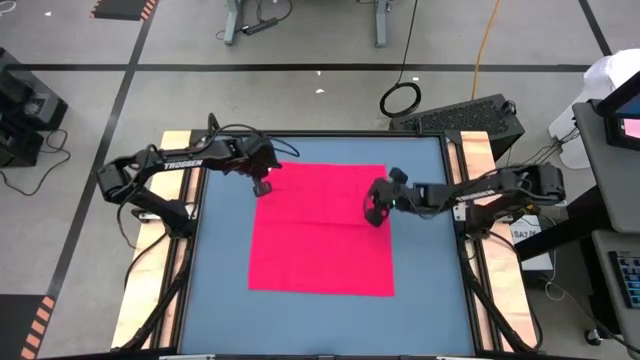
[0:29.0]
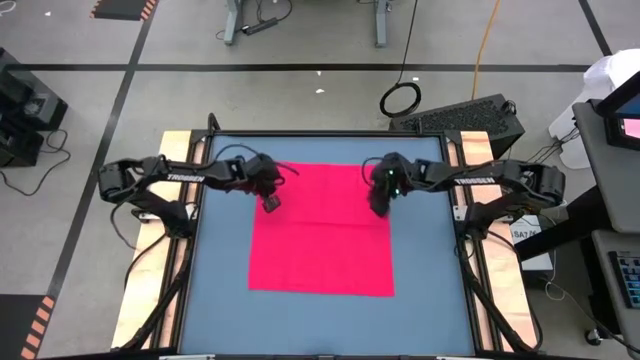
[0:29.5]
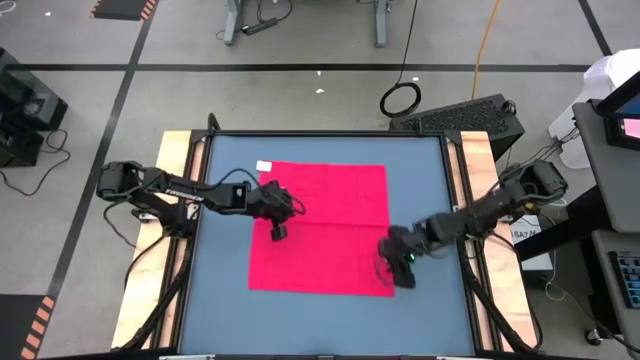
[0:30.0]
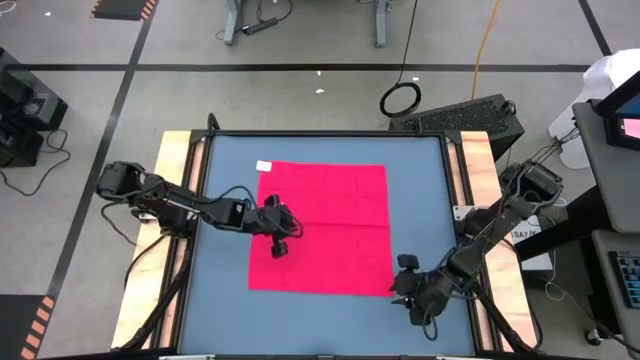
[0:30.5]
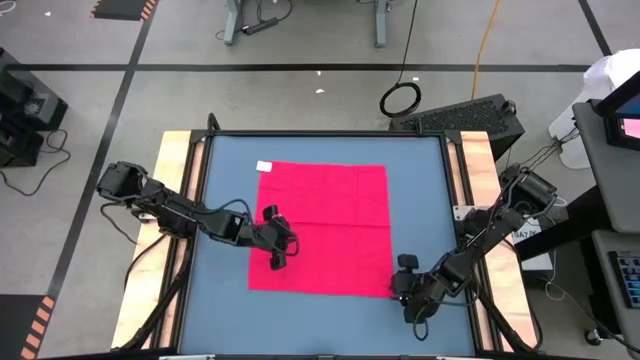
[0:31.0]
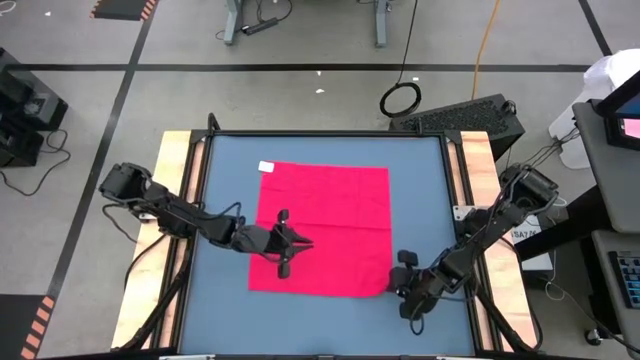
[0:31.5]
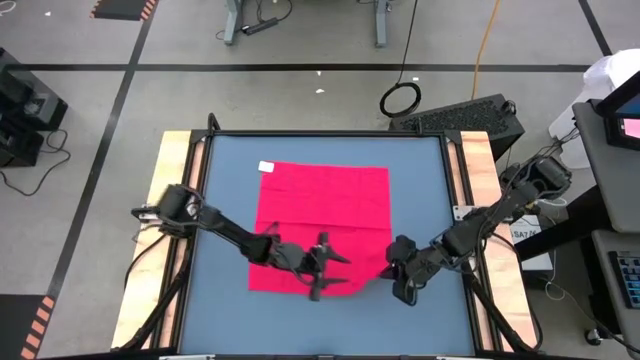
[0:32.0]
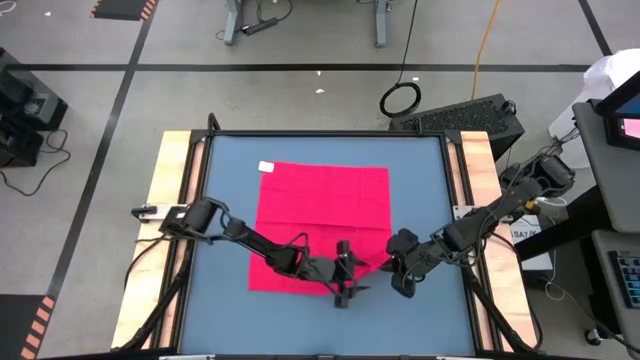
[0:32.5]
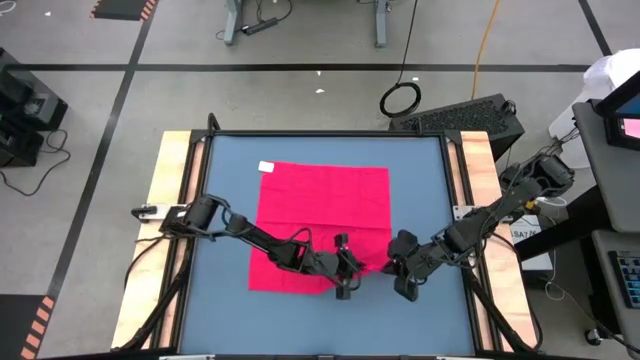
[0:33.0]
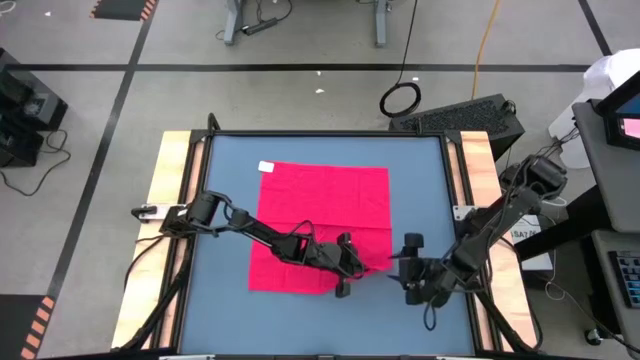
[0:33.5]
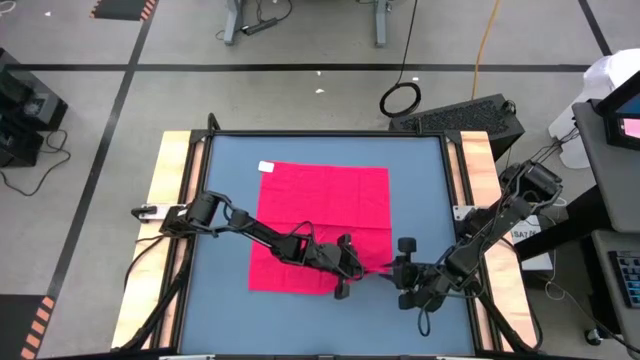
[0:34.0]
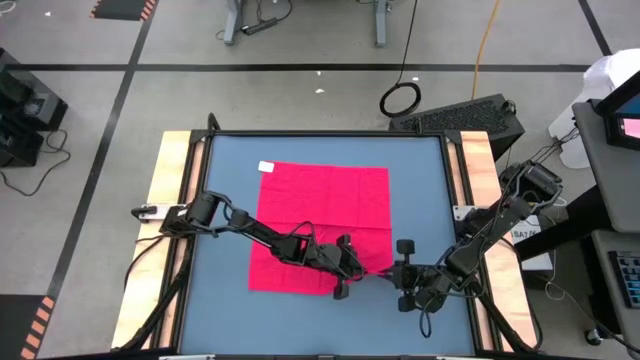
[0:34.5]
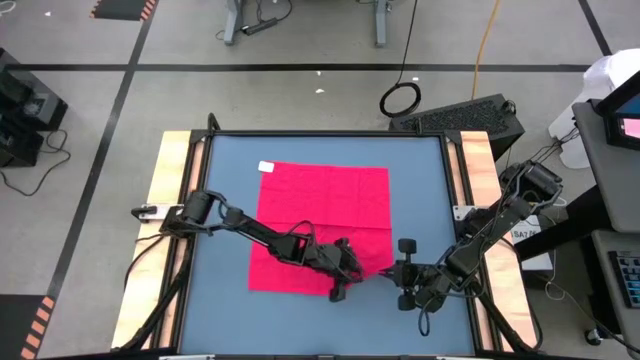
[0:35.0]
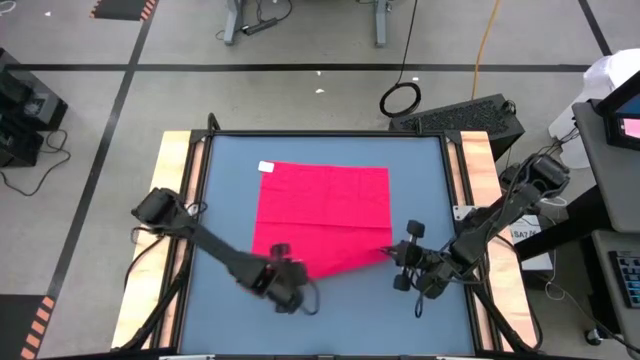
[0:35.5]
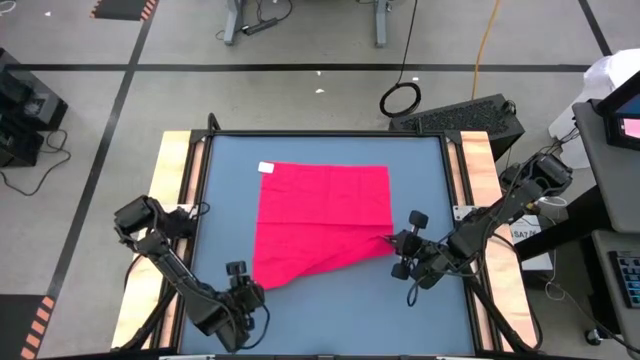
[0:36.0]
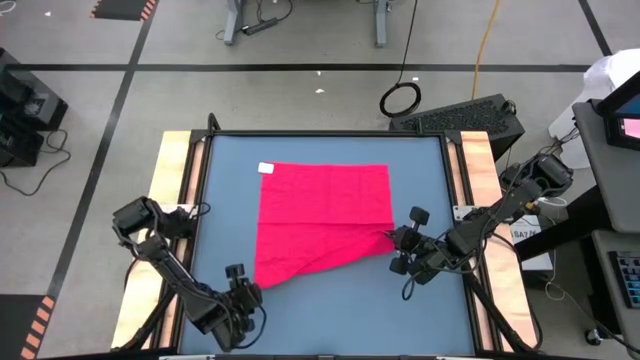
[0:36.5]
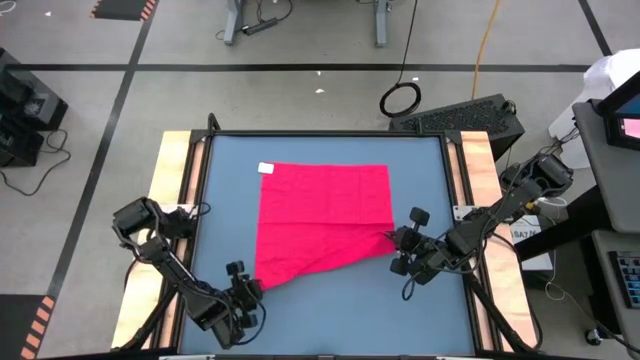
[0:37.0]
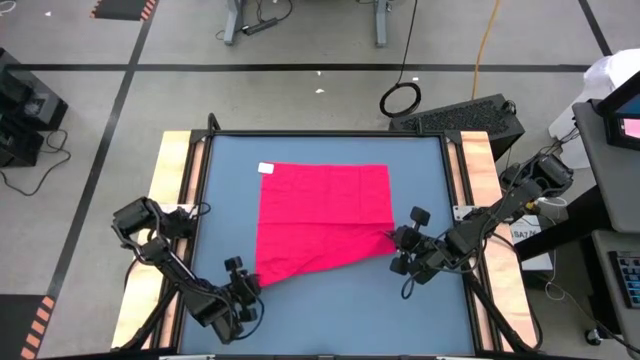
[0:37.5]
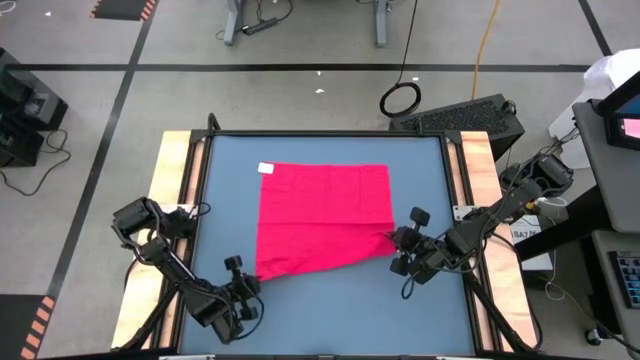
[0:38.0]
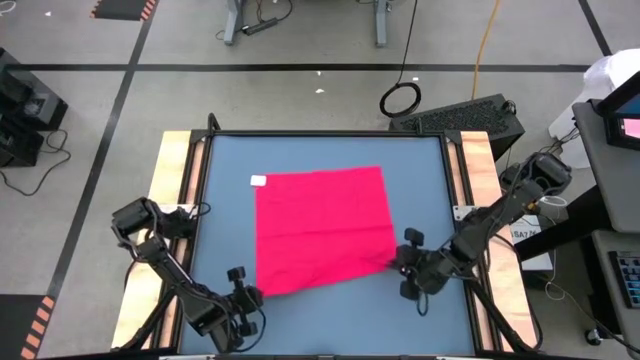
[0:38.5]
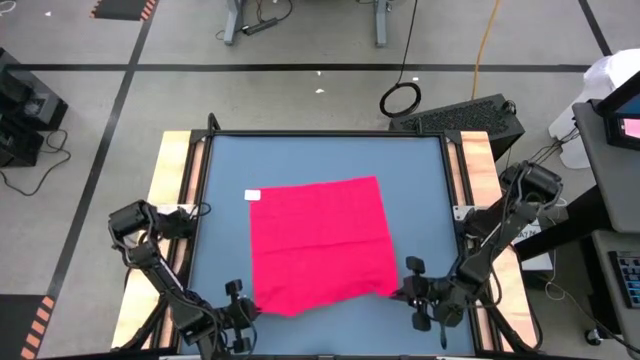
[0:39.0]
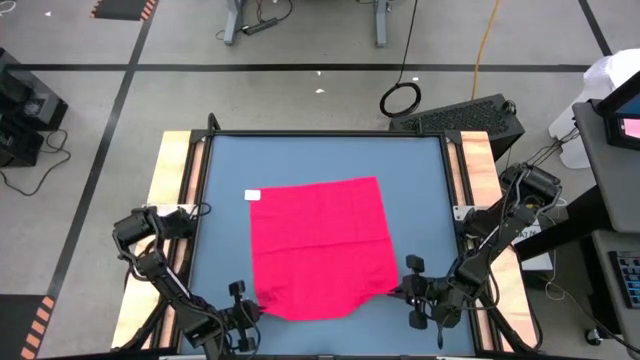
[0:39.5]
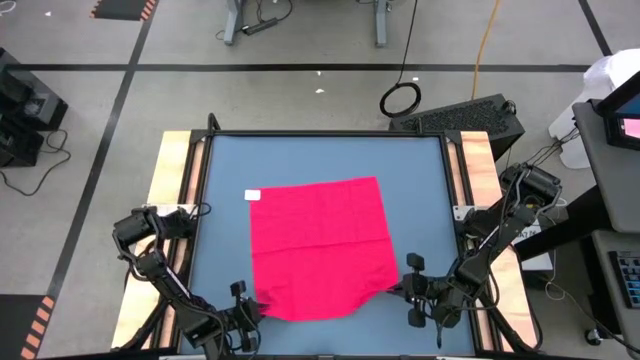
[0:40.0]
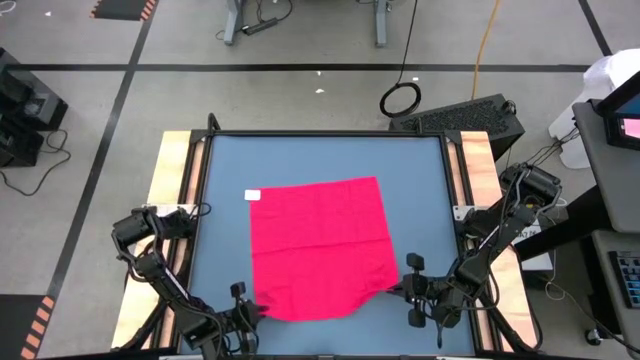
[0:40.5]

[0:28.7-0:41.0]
Task: Roll towel
Roll the red towel

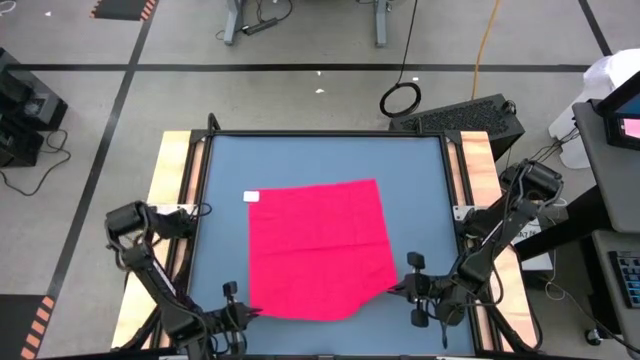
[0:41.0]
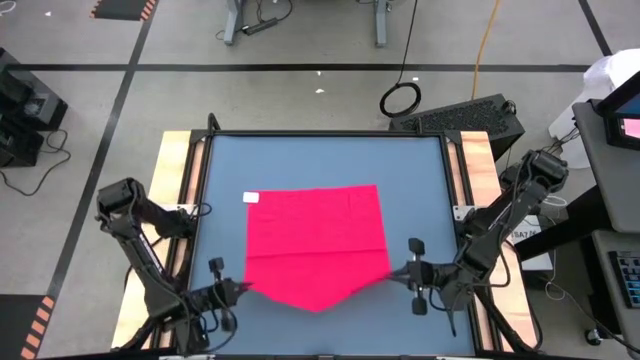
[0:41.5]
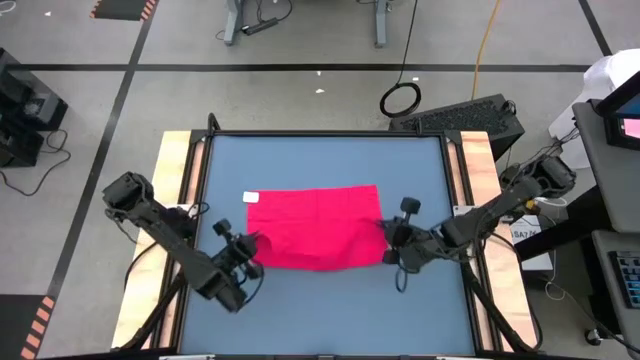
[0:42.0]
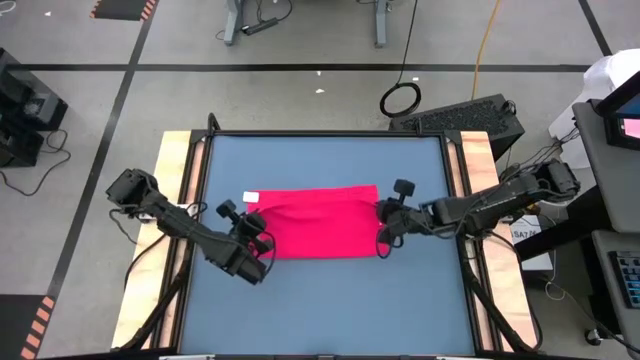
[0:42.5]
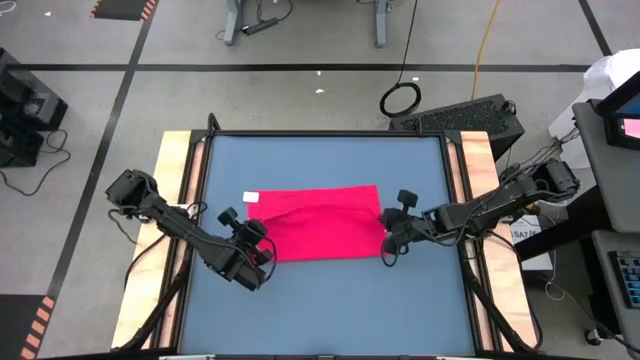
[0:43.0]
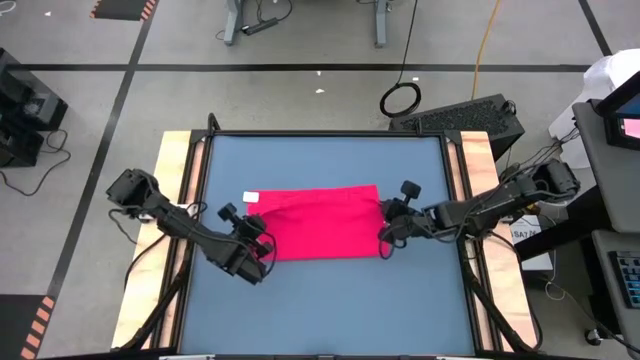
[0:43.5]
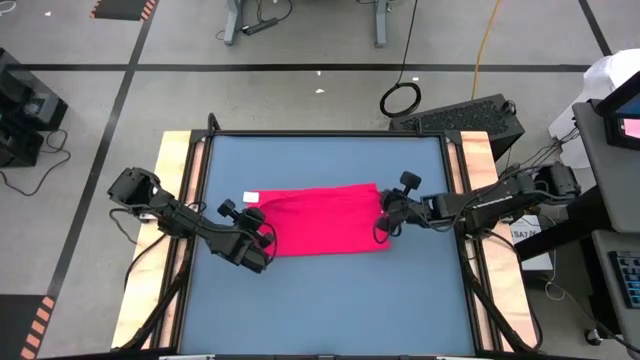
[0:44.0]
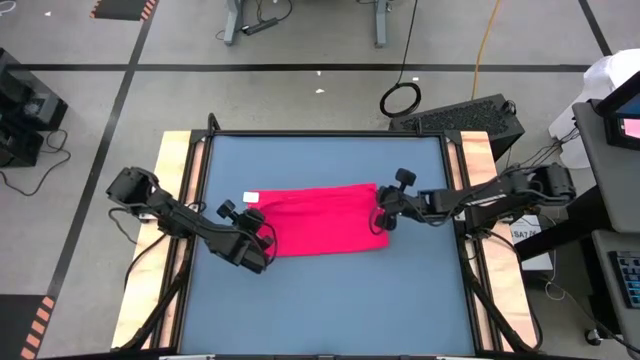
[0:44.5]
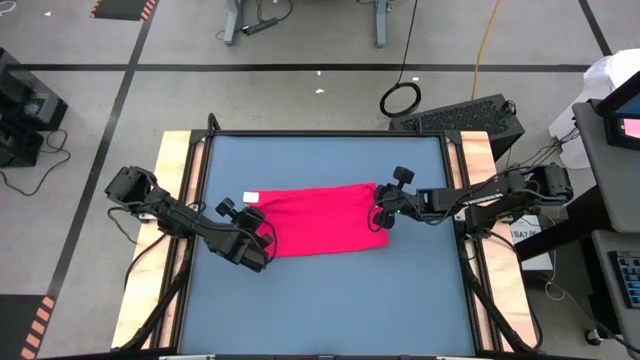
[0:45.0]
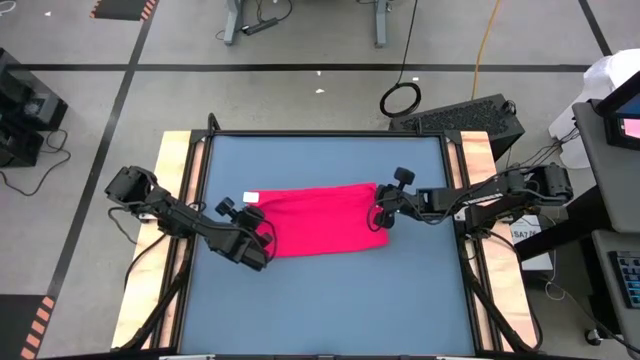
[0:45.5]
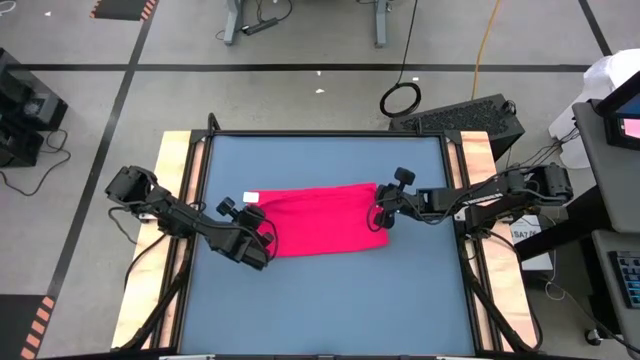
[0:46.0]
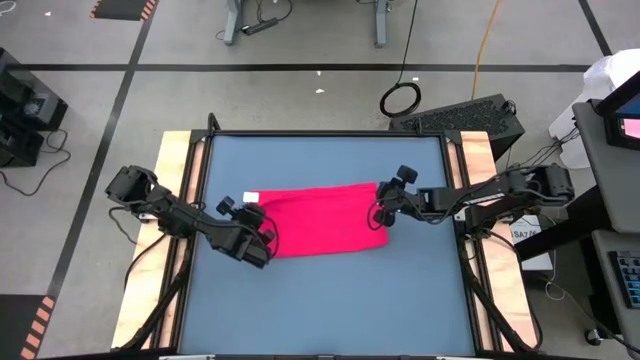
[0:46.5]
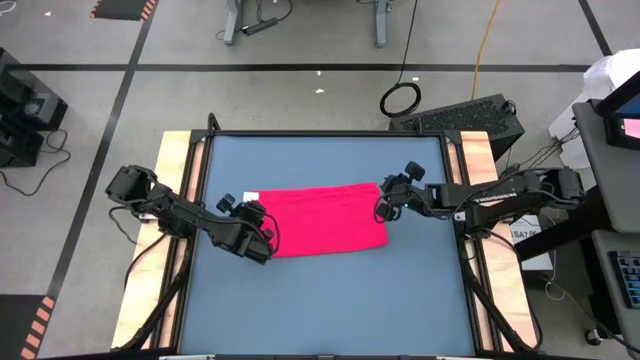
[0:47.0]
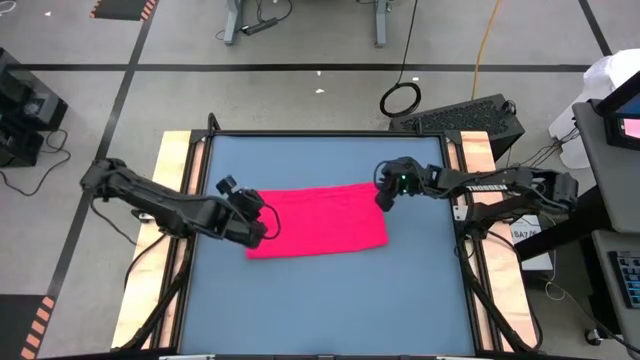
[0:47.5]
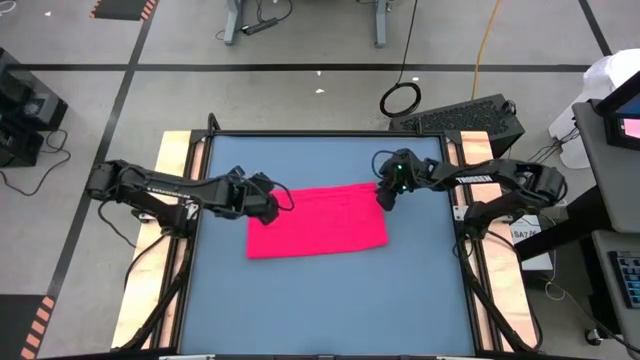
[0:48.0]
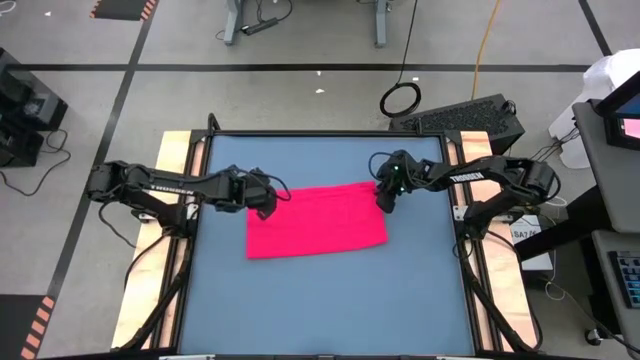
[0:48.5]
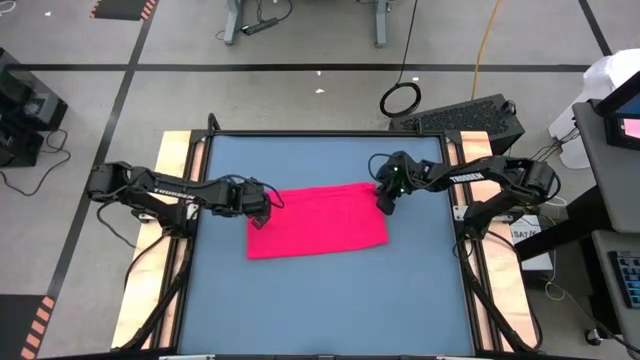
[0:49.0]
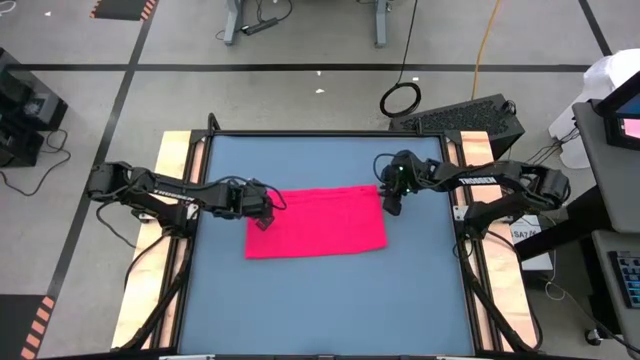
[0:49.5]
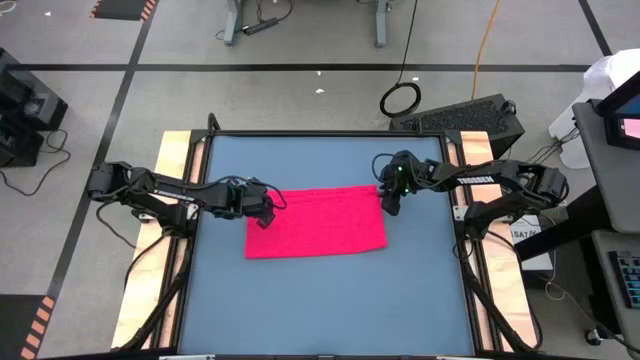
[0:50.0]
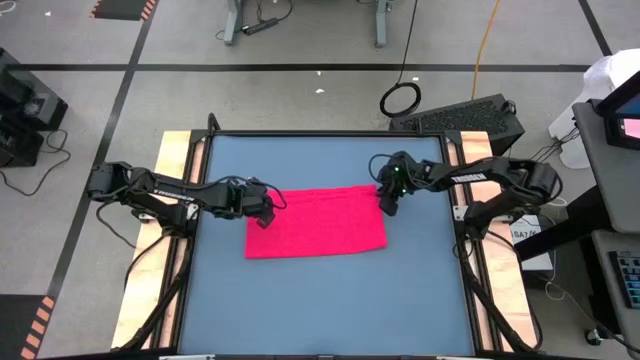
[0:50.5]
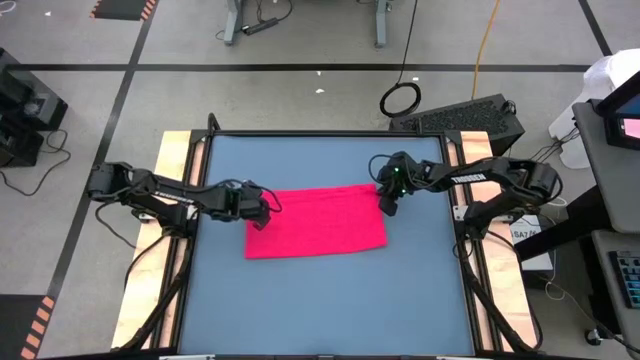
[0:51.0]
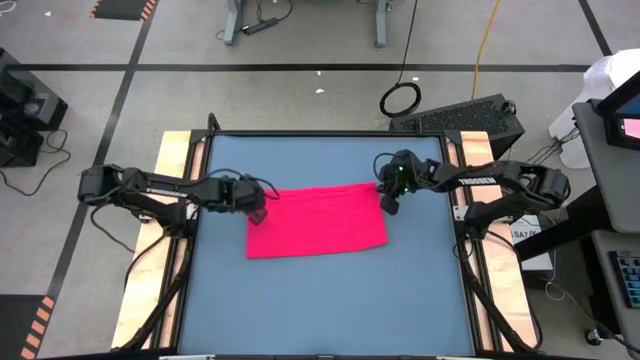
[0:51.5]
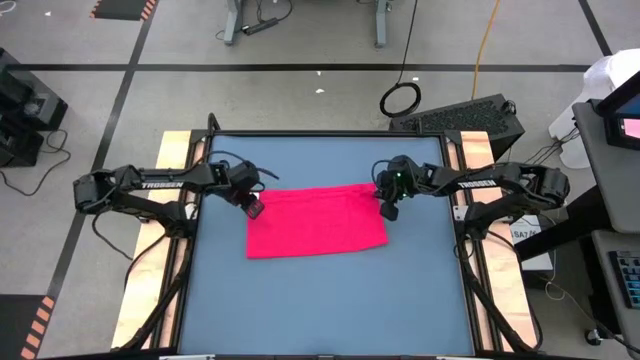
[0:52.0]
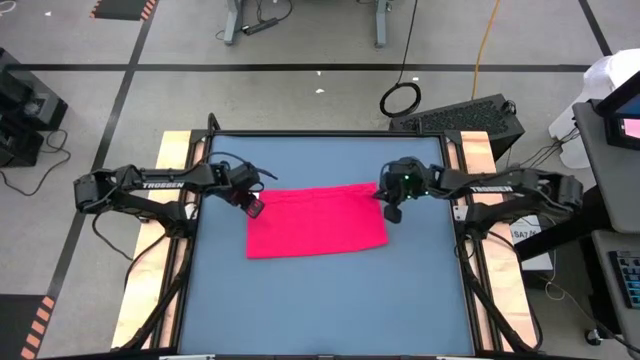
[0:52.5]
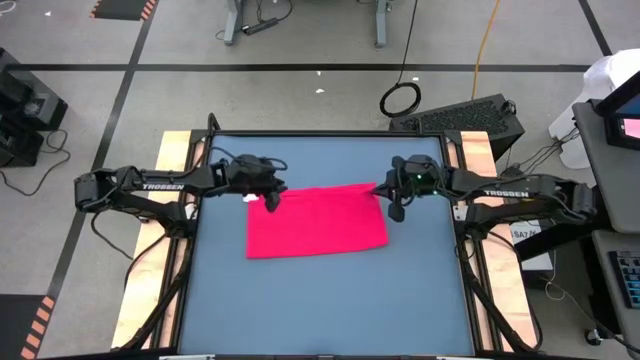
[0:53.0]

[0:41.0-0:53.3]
Roll the red towel
